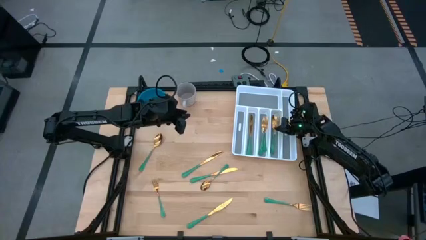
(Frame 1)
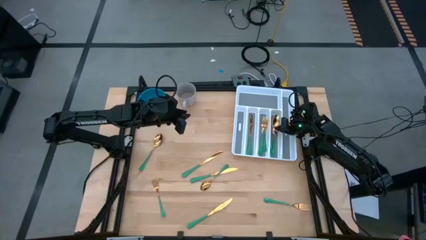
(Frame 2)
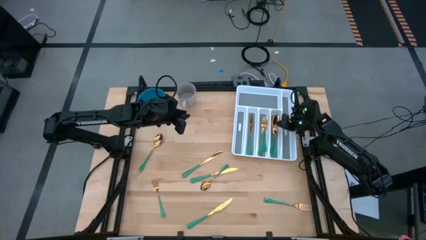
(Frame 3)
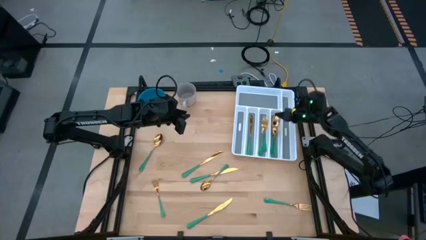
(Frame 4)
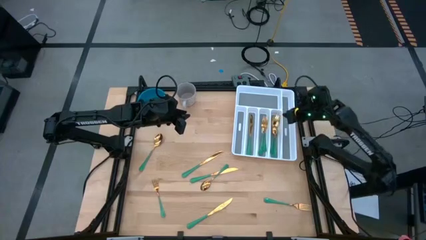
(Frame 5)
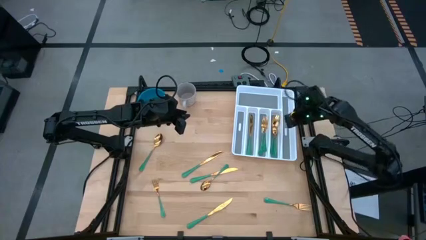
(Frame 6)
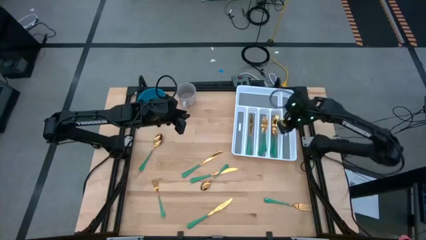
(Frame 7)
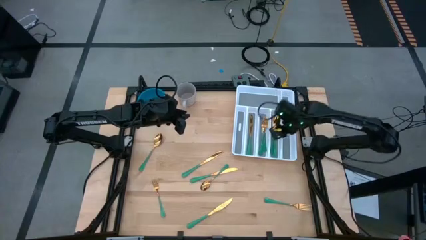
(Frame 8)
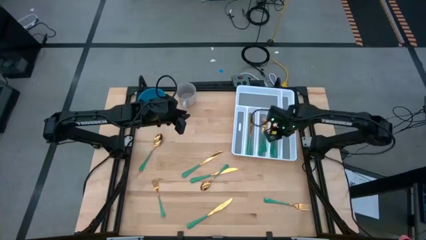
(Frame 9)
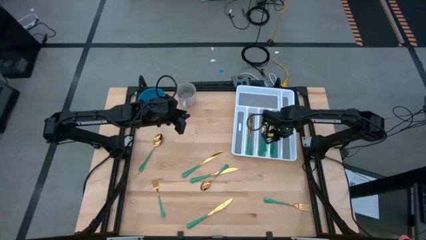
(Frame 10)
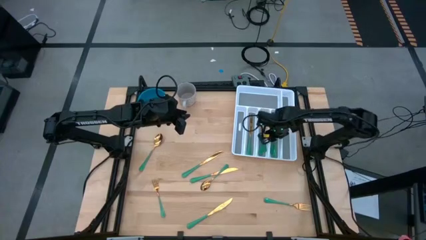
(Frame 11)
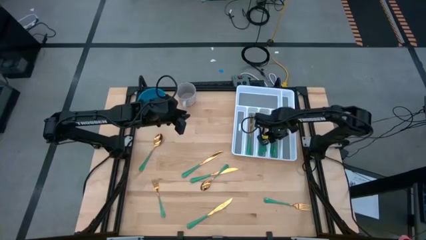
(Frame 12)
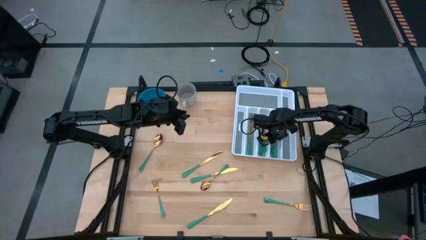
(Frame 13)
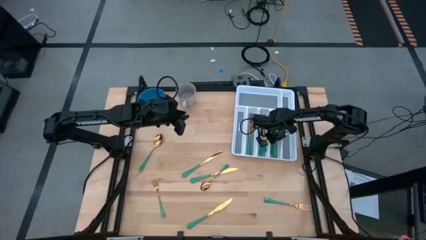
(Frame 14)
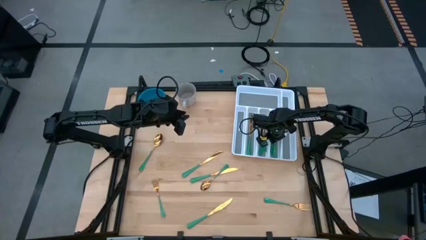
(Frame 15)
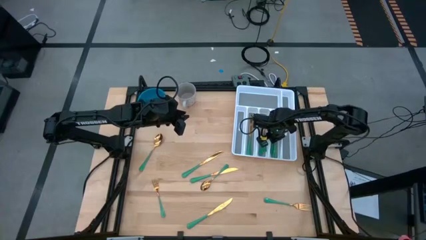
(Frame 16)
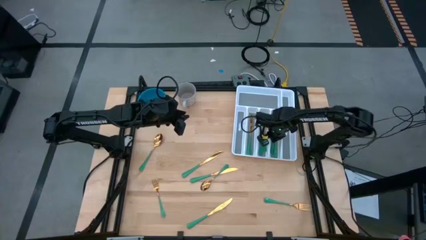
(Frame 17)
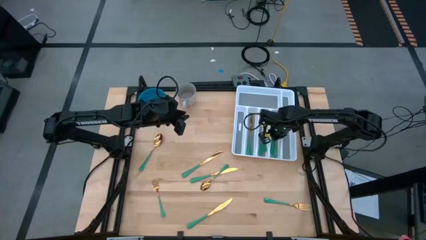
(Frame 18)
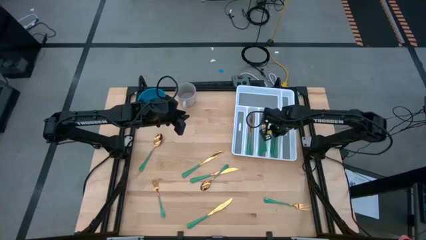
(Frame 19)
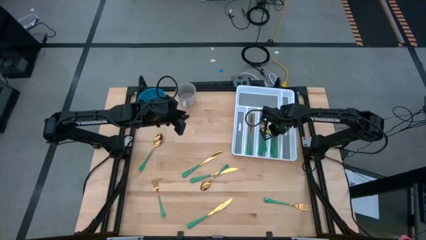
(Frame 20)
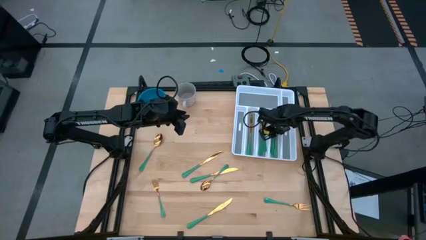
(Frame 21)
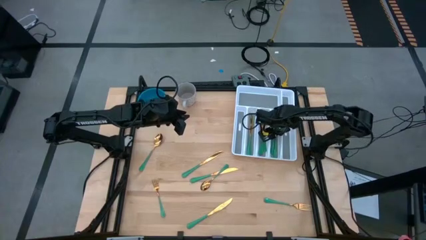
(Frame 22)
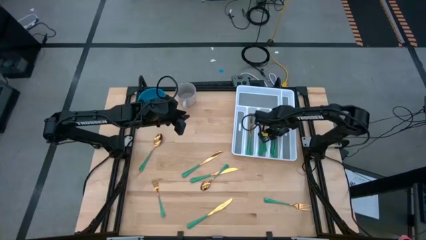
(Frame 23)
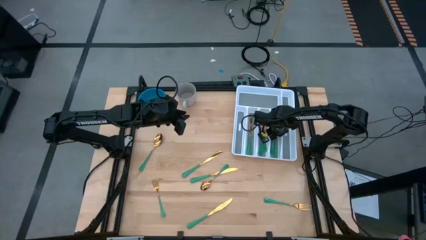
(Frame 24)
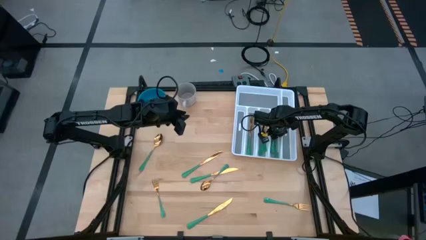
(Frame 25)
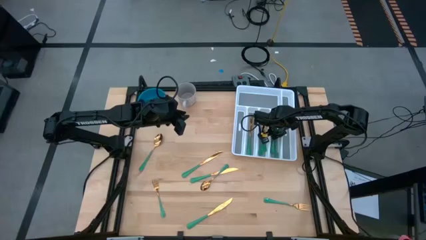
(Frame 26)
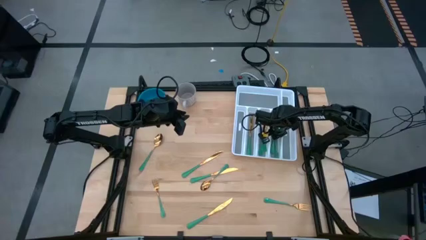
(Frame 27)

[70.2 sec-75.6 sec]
Task: Sort silverware
Adjust the green spoon in the white cutlery tray

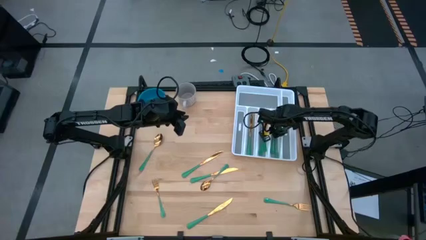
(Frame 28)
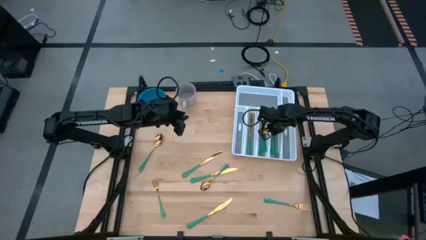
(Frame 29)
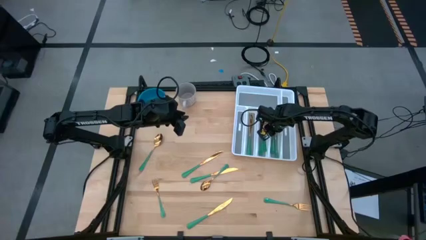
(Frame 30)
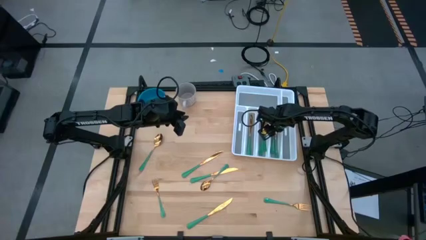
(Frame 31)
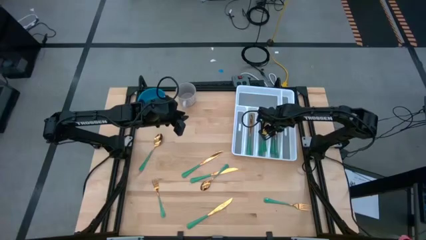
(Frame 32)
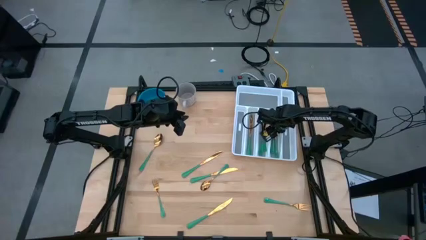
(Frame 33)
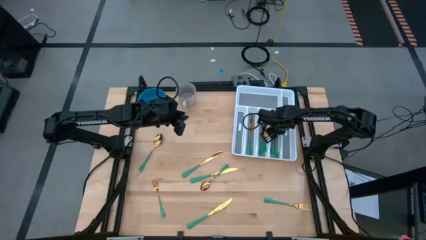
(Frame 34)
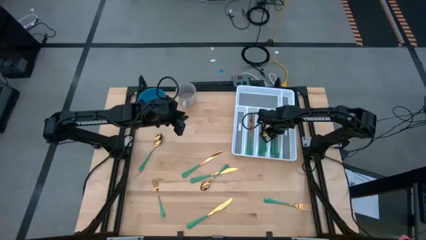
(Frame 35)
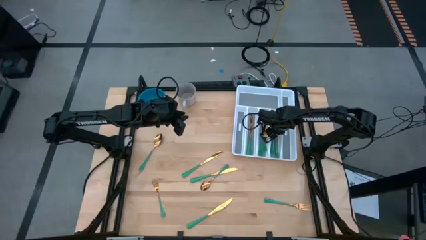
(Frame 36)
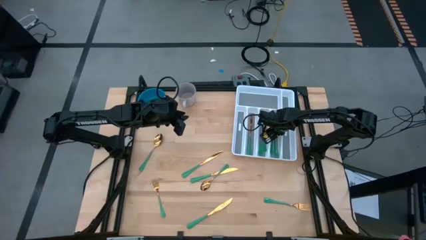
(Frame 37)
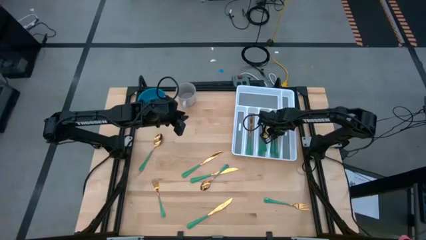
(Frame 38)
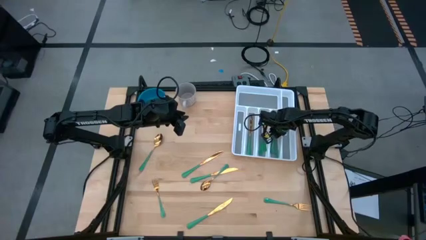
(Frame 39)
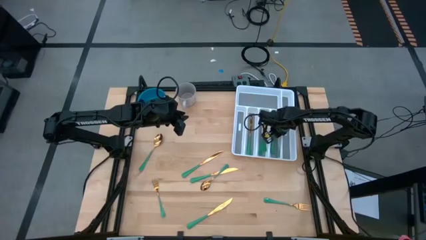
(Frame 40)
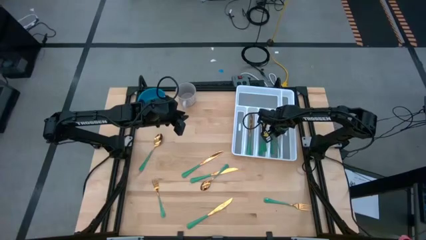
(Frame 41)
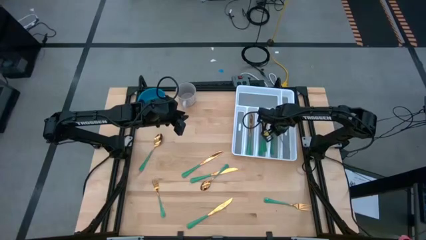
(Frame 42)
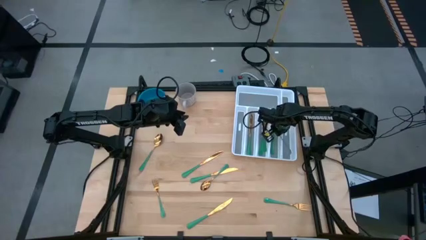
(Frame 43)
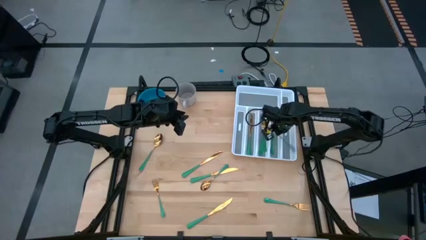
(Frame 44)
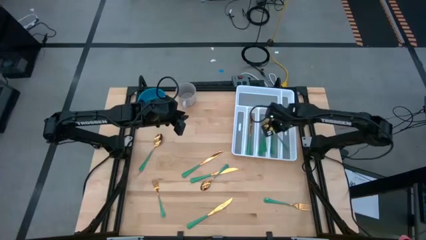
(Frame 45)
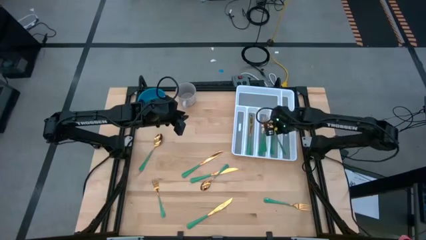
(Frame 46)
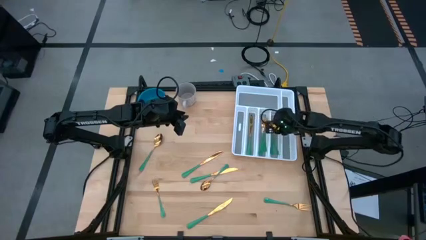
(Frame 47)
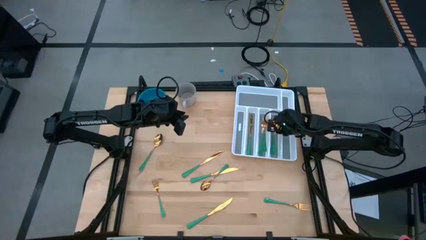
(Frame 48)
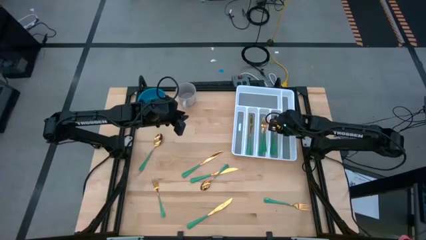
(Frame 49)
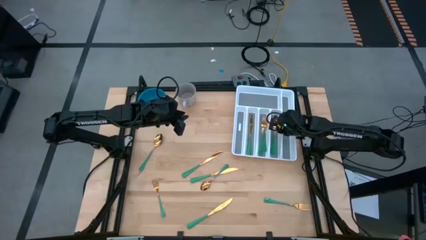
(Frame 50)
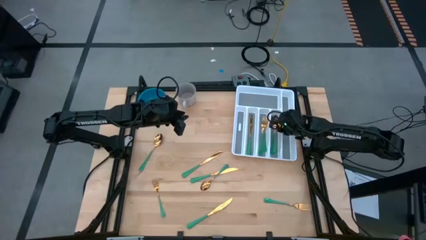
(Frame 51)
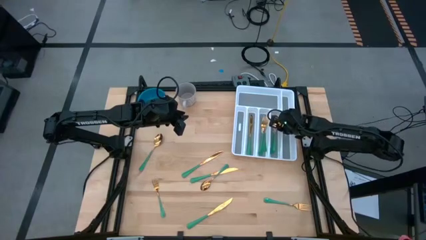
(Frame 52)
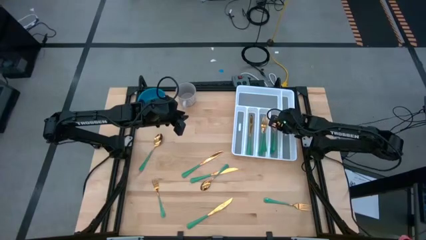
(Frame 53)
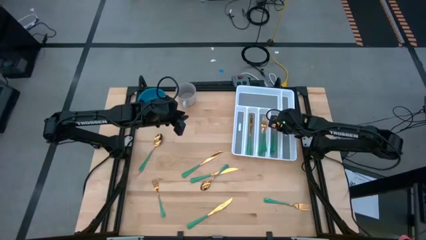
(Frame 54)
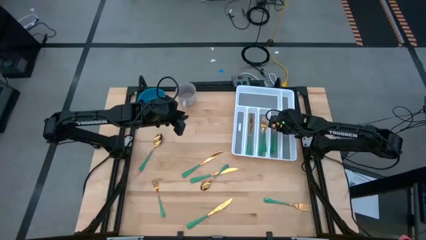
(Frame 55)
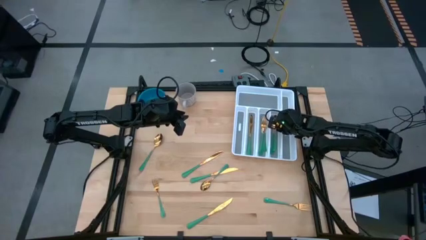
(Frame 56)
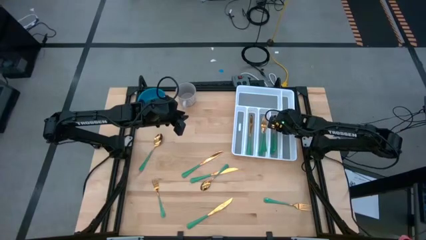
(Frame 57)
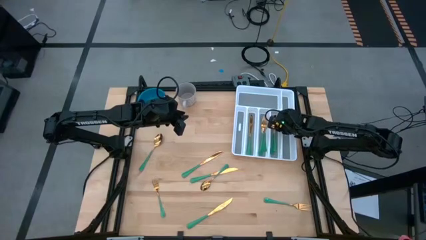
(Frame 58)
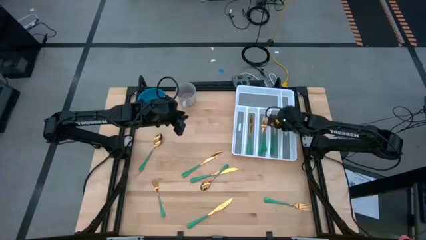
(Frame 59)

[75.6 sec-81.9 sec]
Adjust the green spoon in the white cutlery tray
